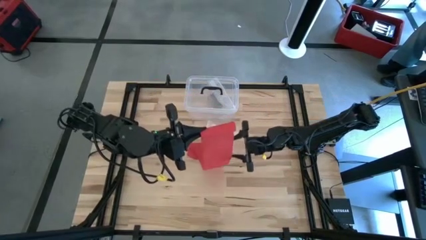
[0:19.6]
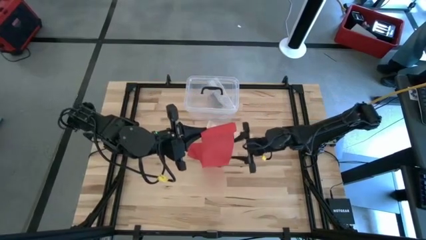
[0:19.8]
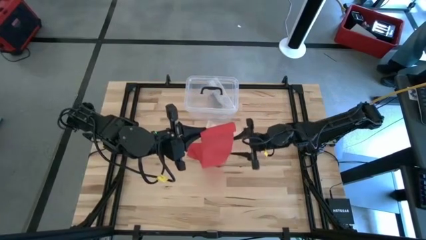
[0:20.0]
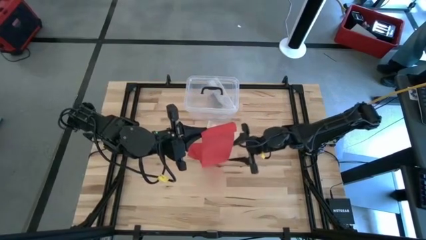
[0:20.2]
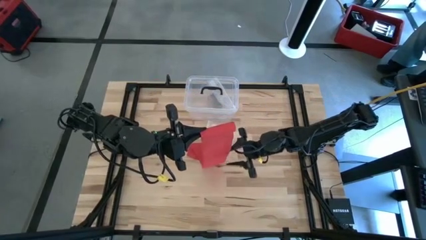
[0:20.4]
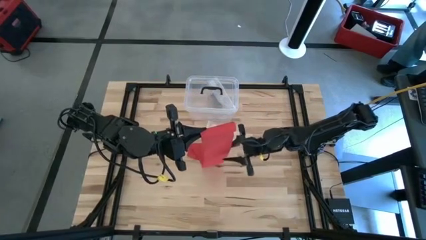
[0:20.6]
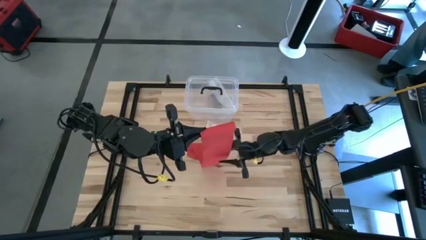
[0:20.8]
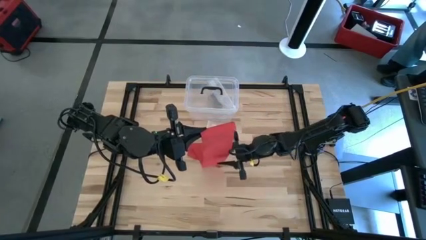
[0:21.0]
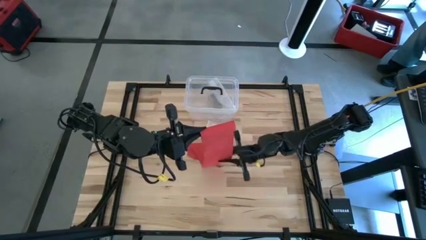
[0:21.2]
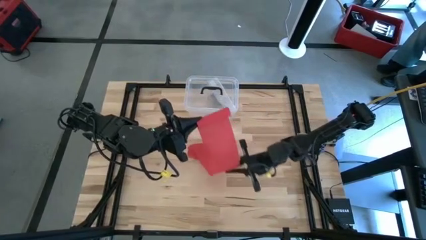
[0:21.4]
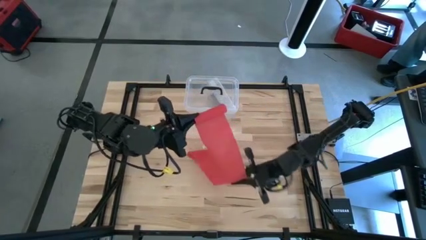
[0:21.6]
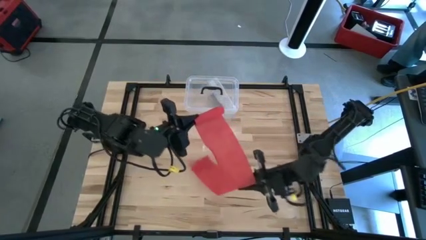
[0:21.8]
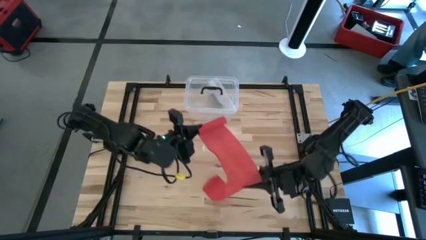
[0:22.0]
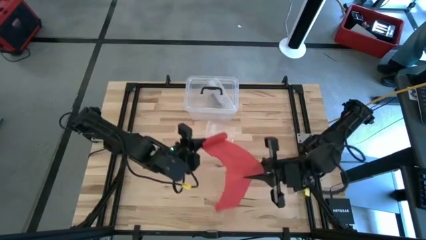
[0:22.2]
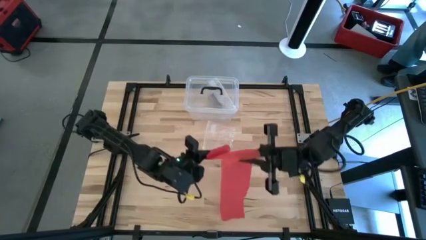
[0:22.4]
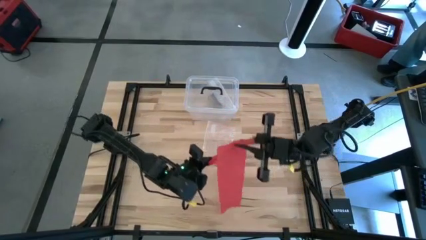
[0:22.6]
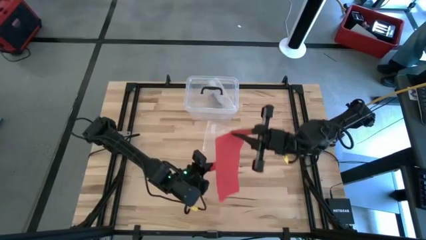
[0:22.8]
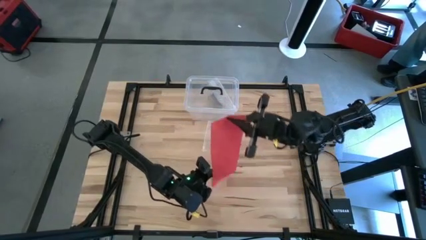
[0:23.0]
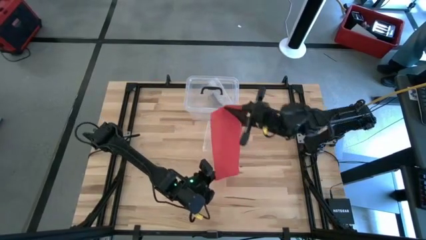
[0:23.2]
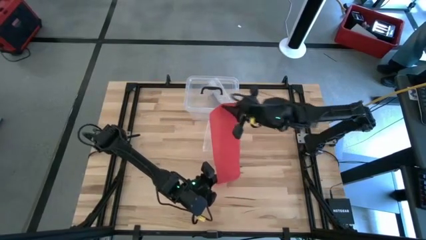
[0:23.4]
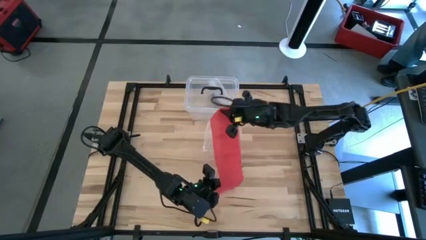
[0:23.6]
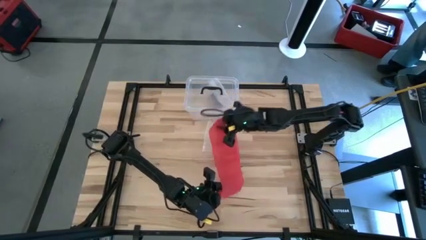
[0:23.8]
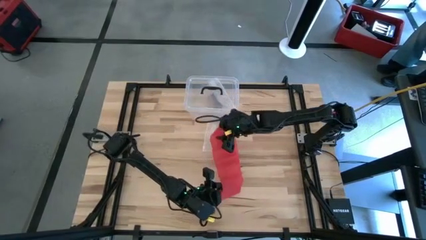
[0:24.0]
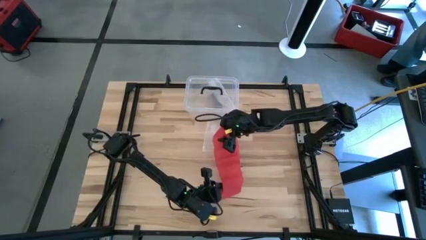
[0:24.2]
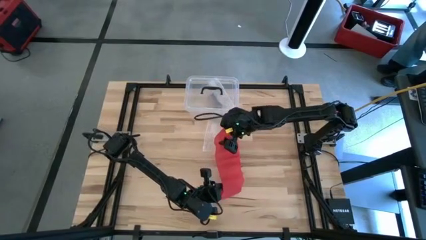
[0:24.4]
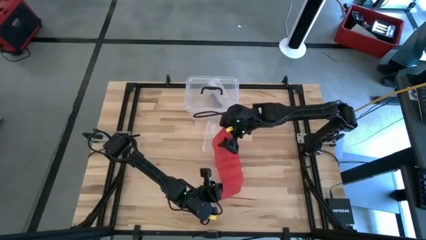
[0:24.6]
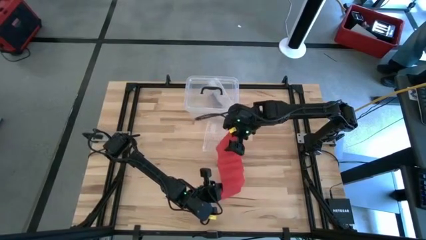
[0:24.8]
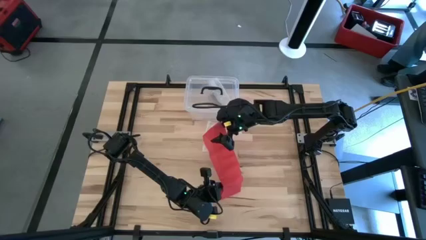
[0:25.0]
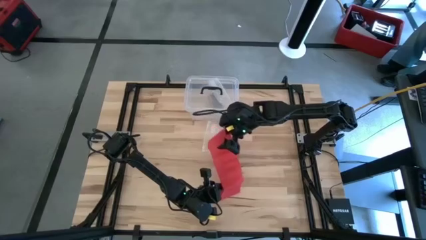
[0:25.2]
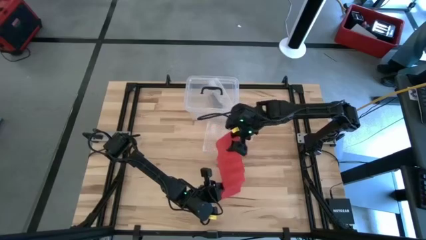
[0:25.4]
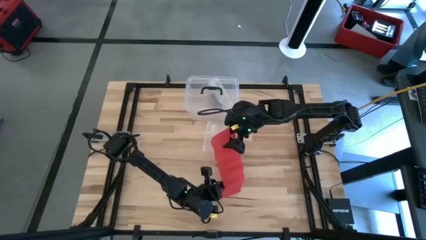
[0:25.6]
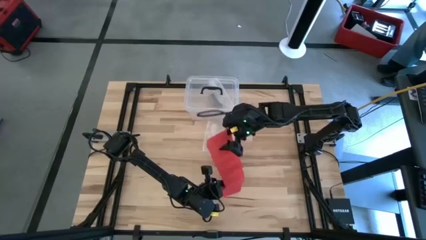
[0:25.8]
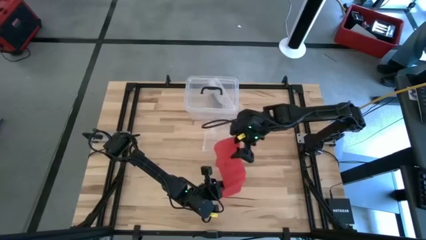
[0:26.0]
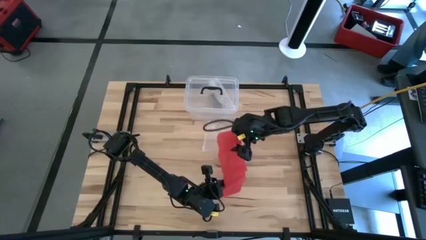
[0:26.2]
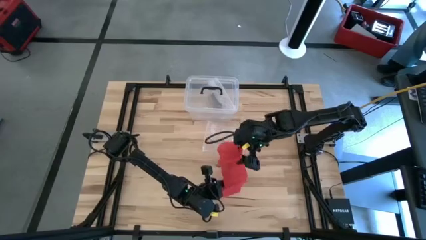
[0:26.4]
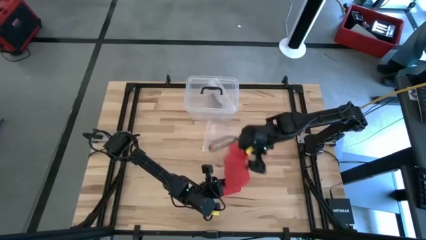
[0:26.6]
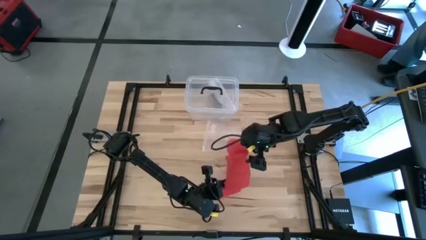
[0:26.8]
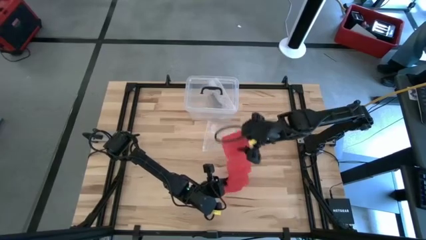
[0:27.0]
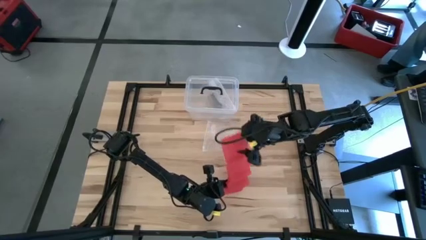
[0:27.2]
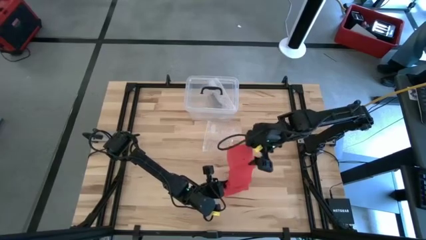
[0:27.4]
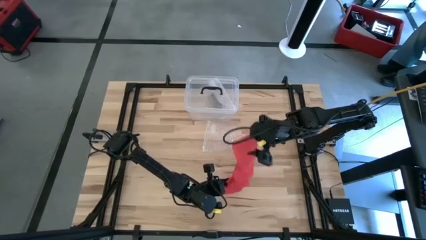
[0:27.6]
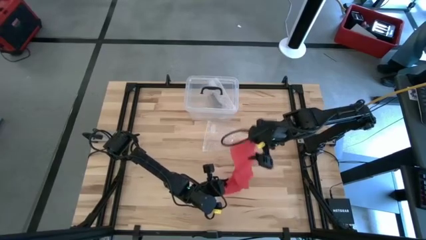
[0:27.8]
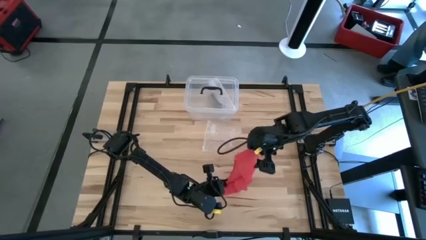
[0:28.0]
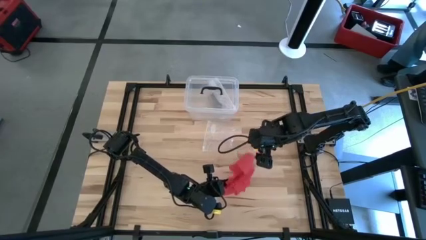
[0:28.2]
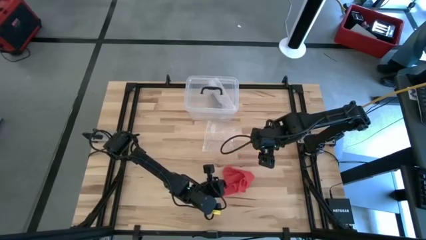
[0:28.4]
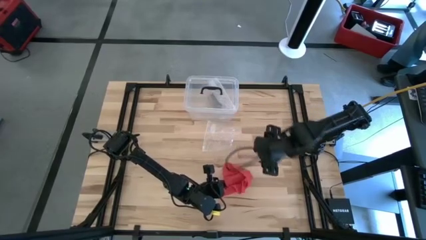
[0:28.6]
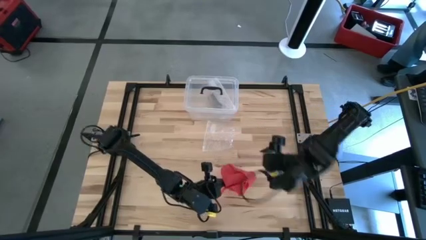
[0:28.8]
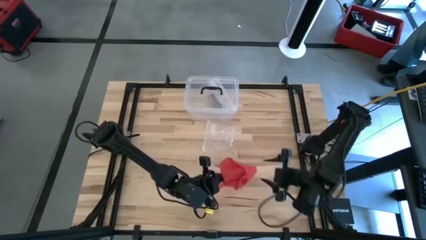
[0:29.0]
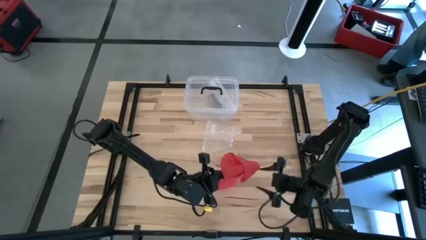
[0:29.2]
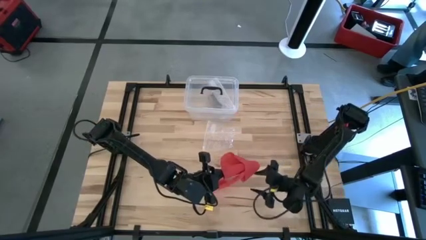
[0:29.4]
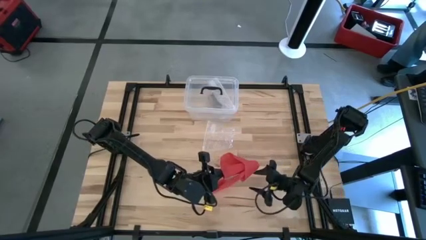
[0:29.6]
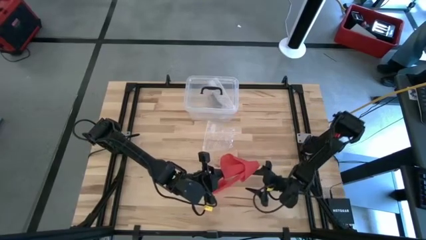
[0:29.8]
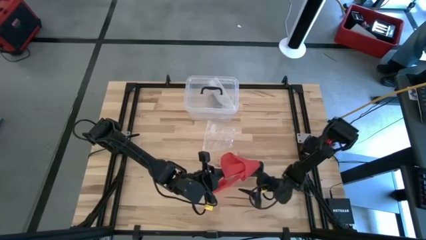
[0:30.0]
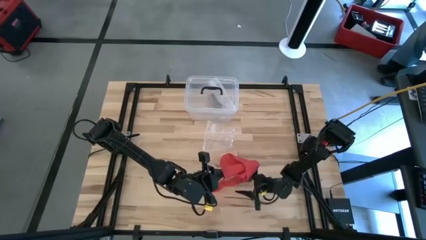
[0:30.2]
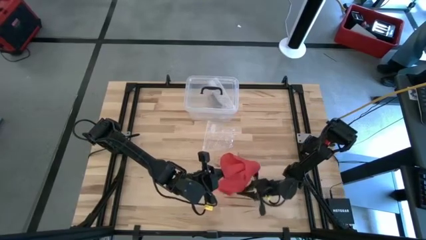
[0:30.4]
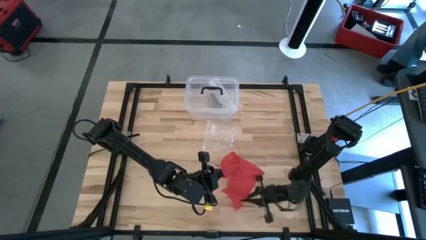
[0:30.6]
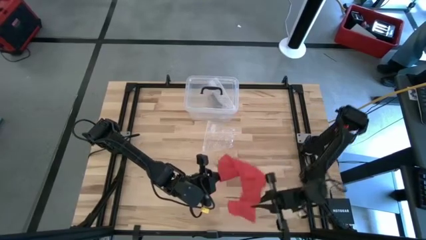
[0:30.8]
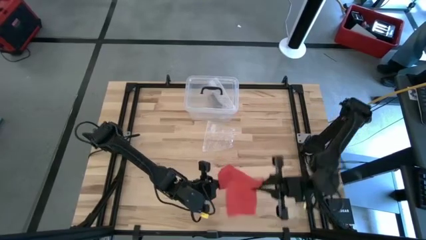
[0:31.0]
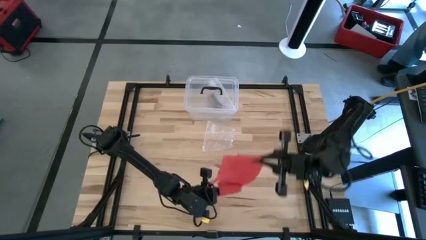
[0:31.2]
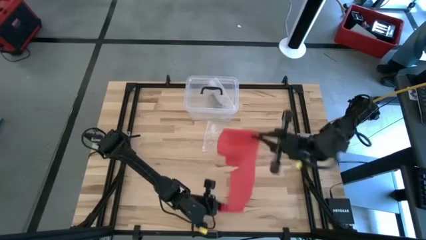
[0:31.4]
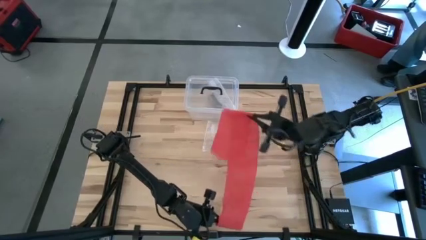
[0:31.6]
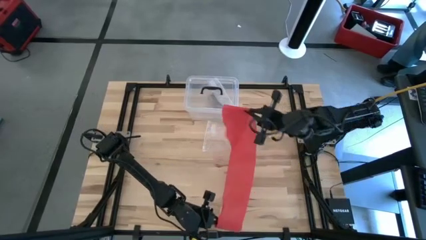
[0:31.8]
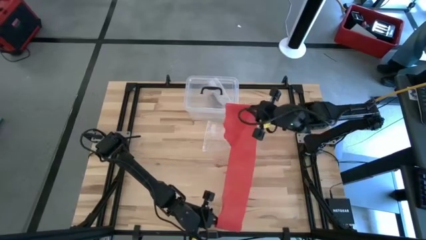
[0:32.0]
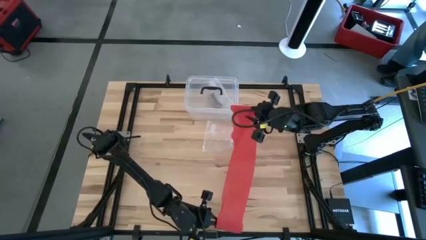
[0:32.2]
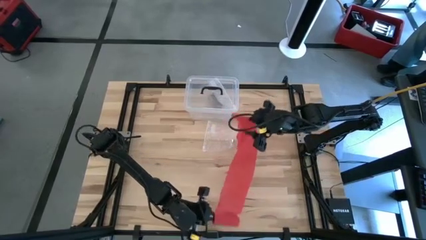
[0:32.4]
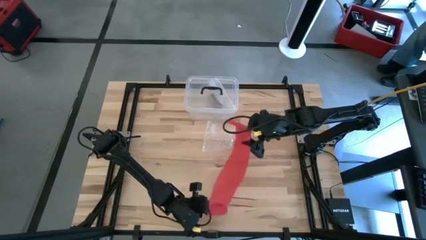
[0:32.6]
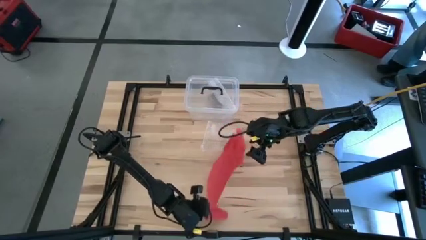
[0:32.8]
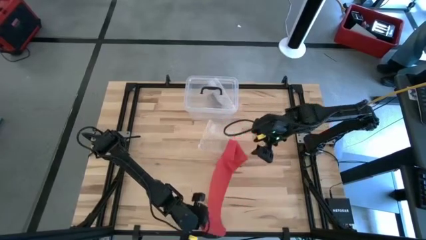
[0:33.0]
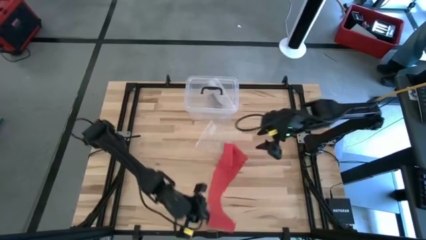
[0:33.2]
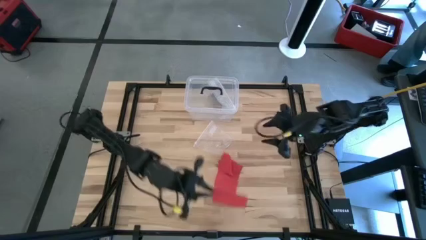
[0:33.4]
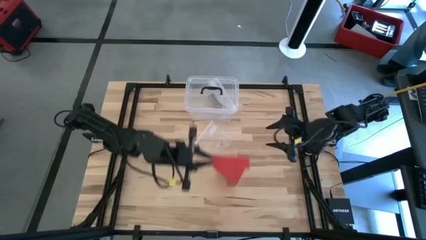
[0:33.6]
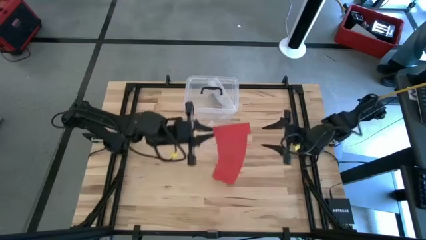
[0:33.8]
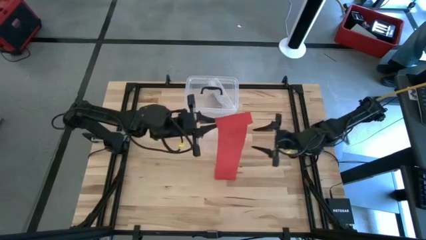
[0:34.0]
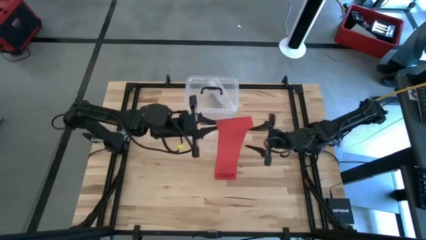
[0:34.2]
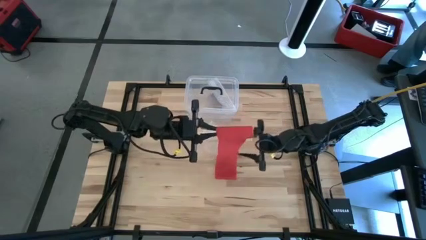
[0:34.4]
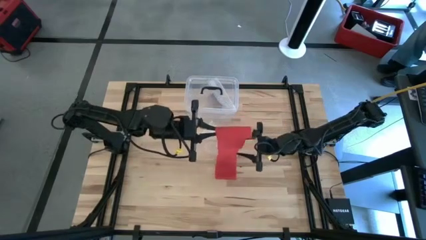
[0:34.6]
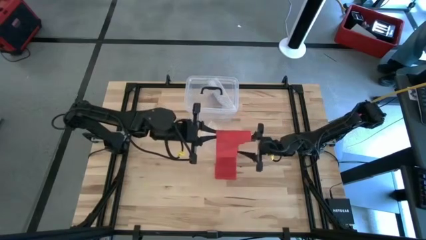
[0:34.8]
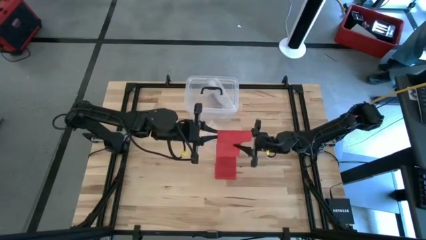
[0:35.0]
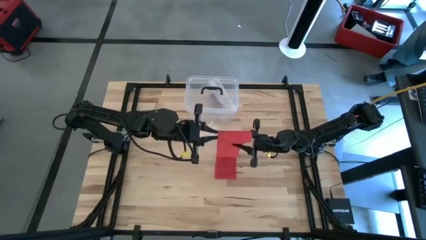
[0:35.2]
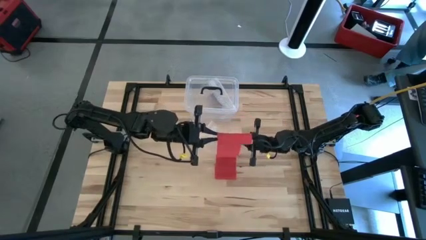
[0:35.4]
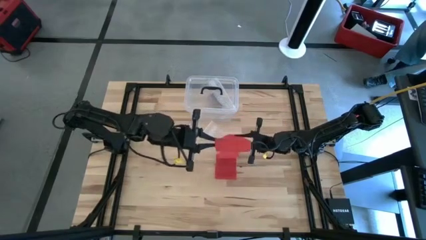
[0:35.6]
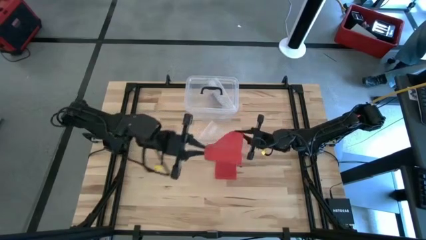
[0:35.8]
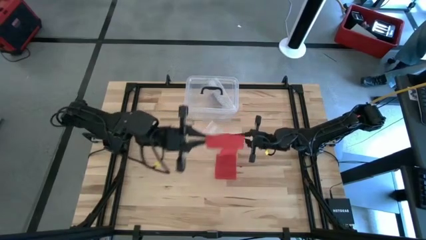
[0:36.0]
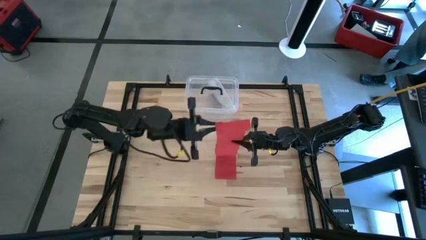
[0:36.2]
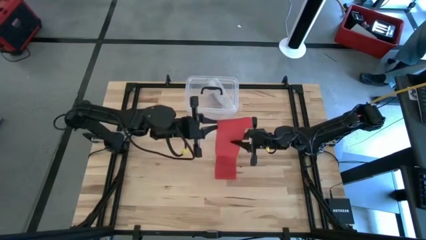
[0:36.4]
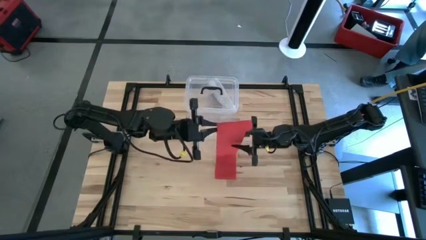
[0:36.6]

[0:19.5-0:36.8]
Task: Roll bandage
Roll the red bandage
